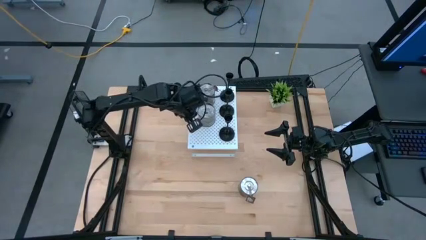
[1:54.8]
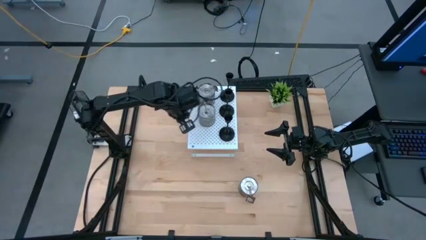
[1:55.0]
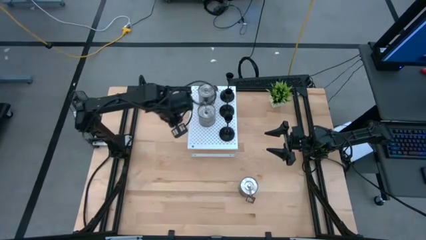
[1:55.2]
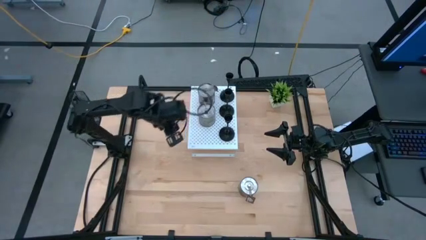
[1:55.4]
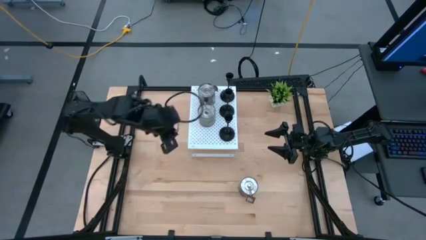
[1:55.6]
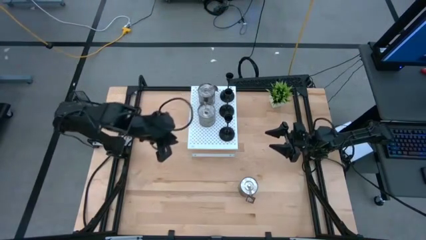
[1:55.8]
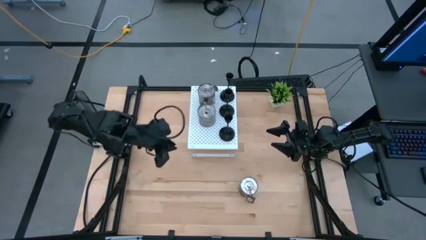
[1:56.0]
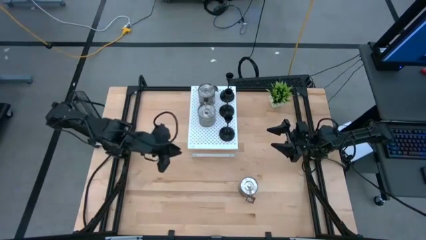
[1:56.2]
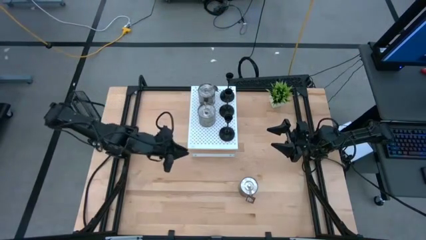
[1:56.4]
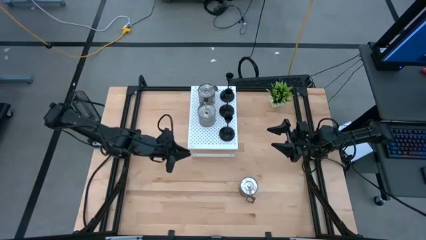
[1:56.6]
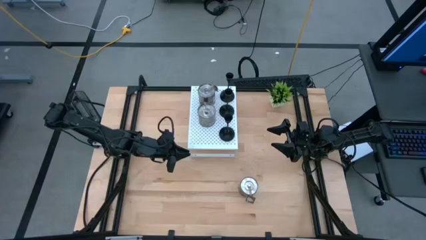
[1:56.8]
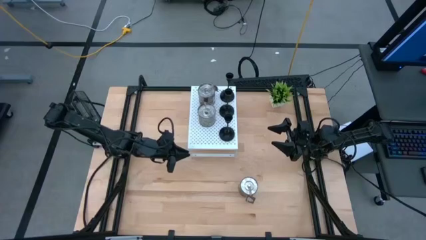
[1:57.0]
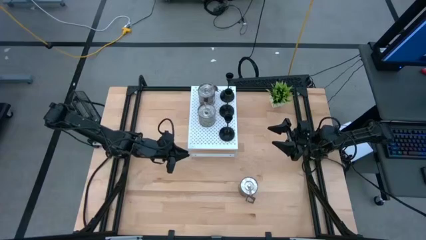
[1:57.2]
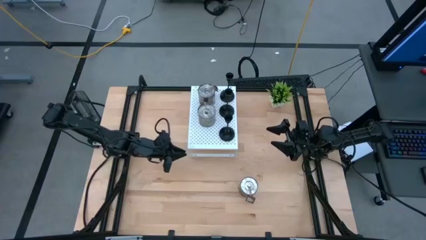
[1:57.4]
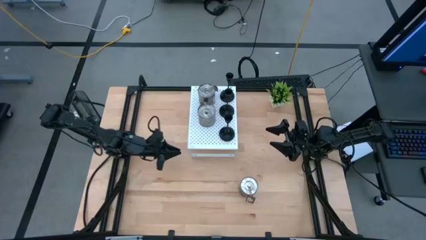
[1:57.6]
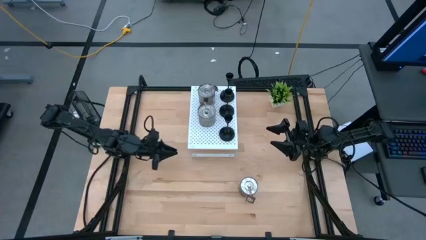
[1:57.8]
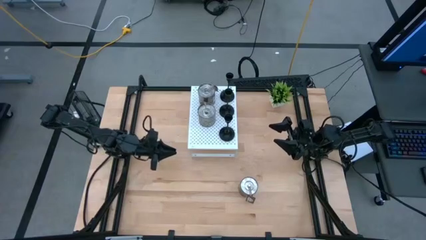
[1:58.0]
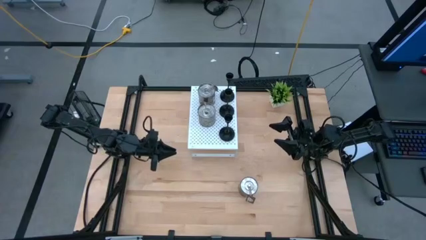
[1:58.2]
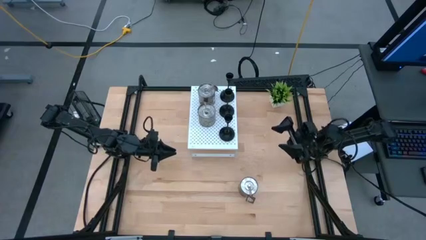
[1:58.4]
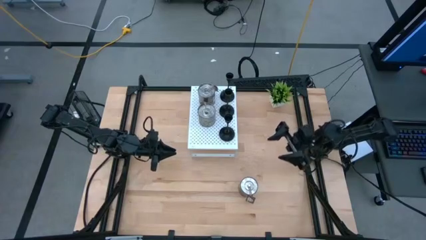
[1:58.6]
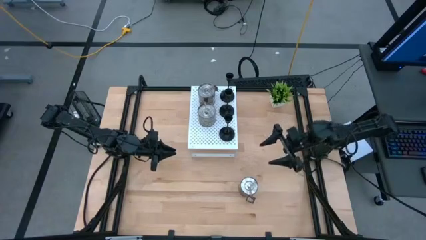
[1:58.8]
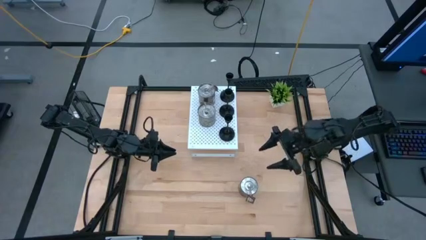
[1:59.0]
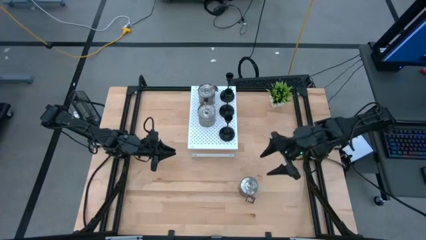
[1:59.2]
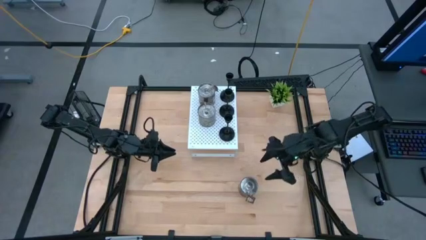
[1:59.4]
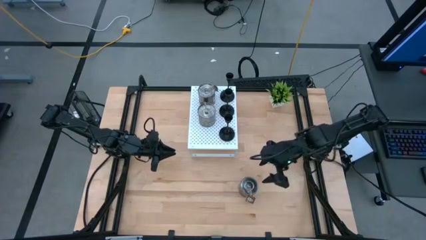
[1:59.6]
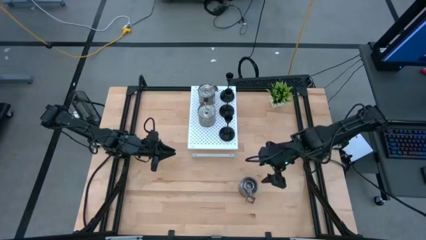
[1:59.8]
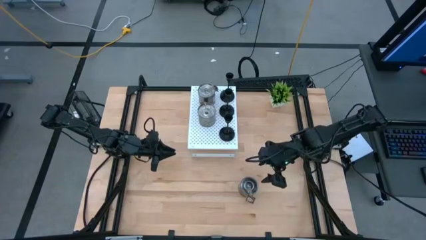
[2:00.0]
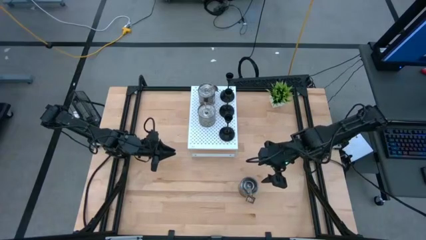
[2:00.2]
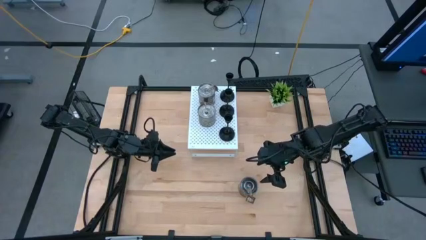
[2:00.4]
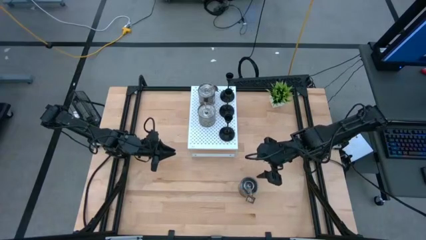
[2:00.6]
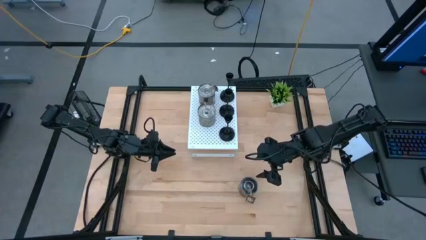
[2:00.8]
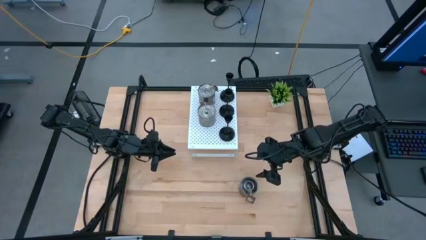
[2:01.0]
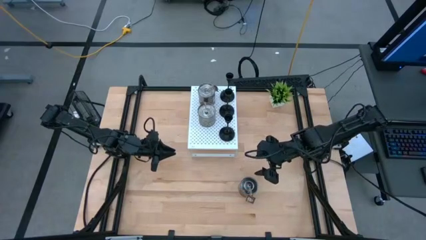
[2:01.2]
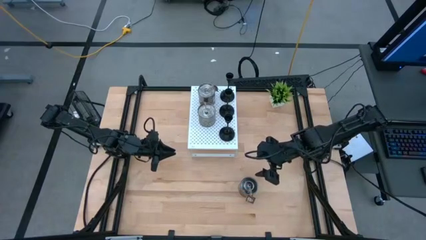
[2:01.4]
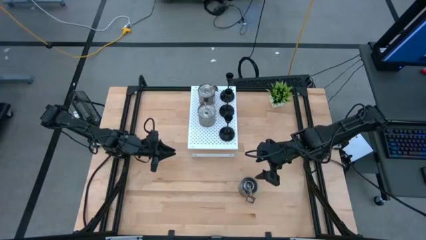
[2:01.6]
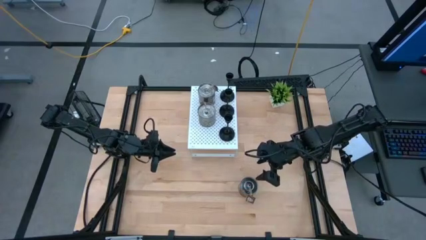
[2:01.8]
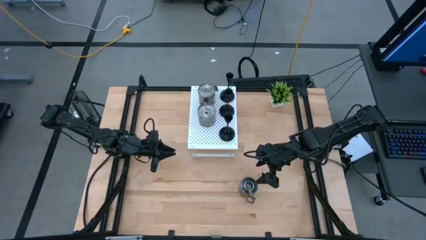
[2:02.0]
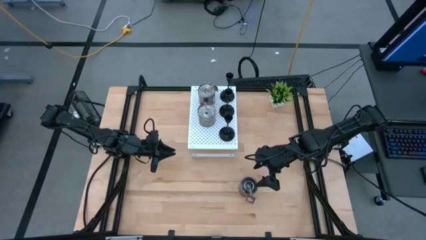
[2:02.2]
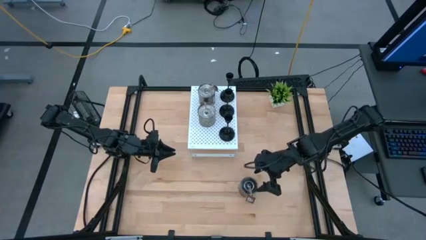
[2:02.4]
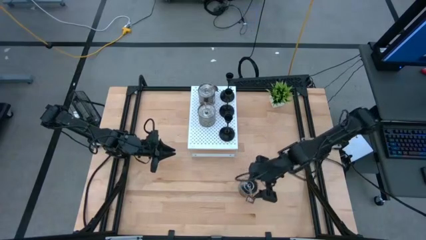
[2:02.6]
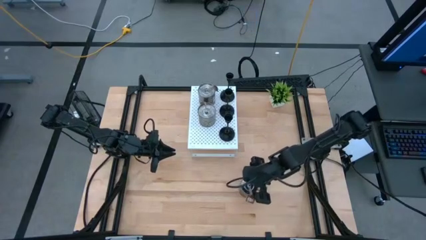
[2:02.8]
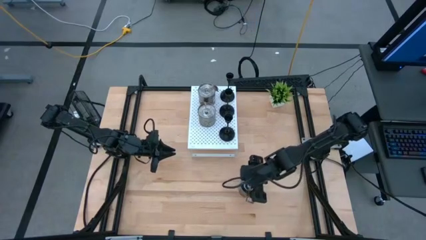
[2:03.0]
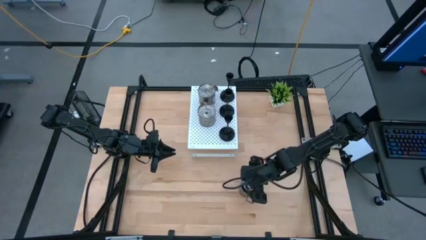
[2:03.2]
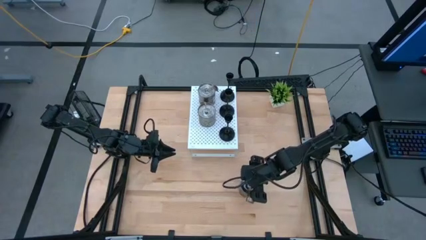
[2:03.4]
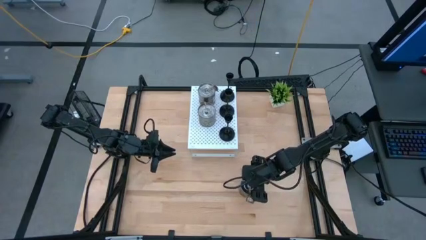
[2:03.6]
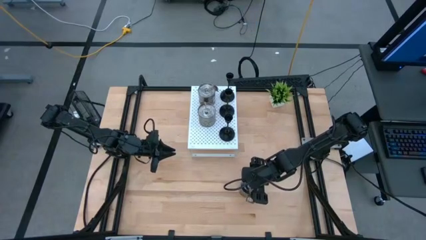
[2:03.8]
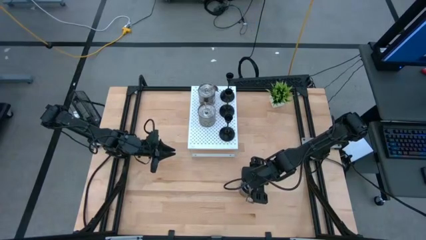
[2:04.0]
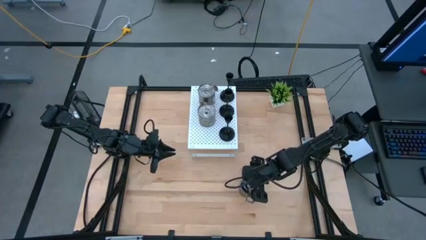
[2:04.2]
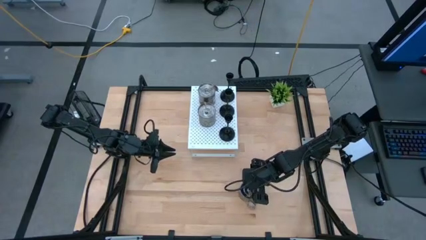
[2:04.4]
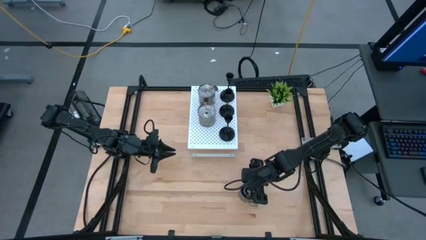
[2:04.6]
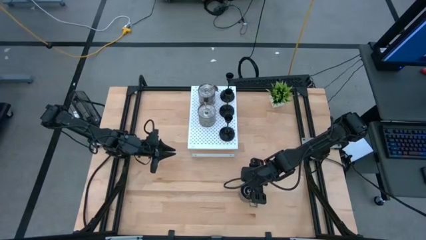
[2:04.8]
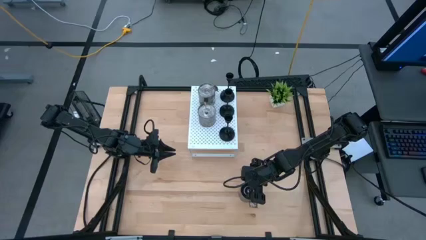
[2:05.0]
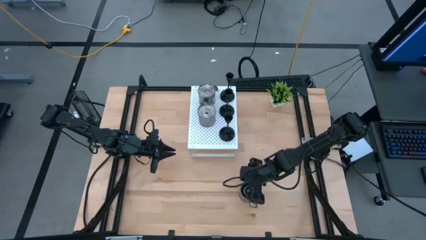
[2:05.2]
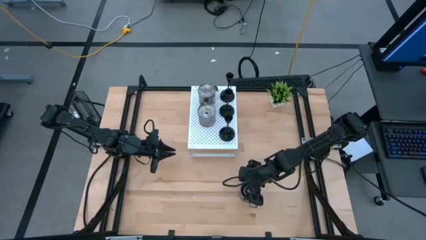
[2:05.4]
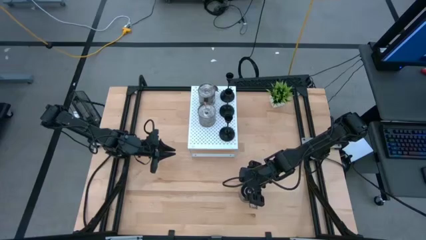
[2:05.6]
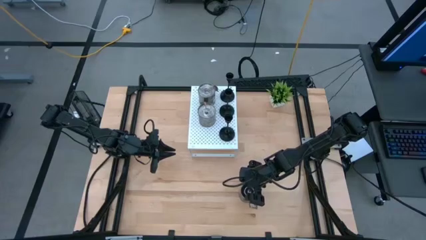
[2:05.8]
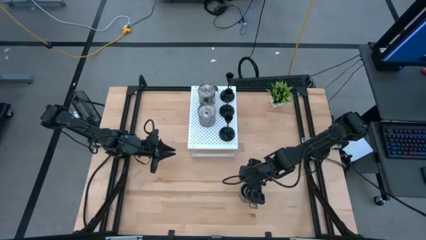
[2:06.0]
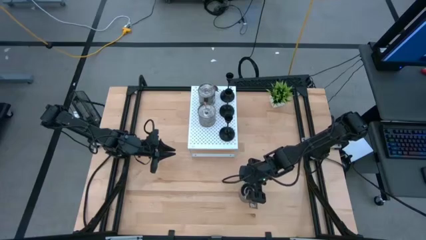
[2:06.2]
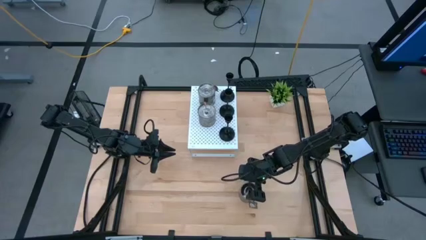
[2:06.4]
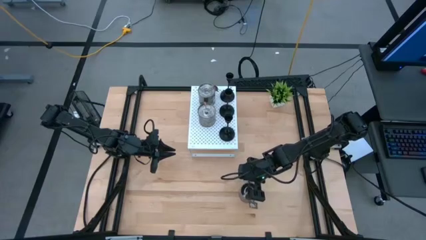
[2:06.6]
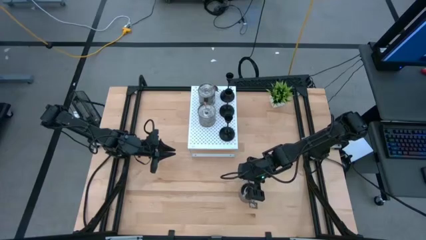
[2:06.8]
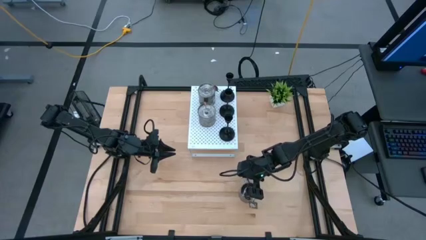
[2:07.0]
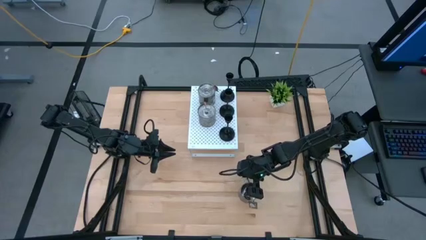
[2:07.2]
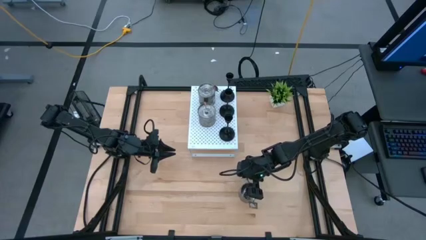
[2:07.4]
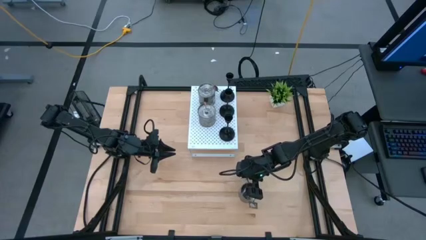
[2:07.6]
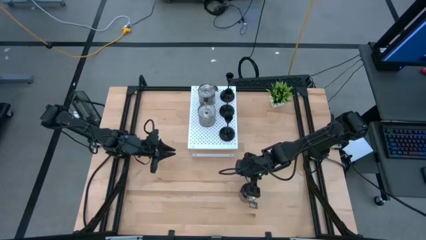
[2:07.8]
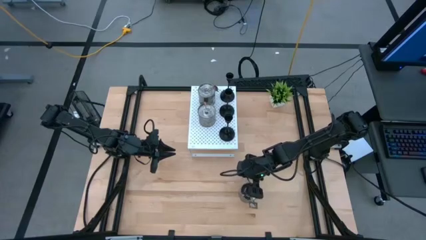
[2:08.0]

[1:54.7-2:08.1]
Task: Pick & Place candle stick holders
Put the silver scented candle on the shelf aligned with the other silver scented candle

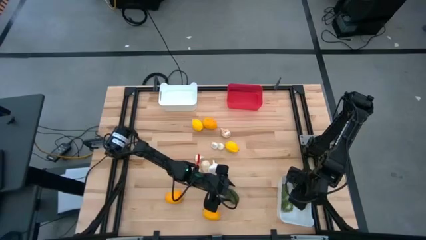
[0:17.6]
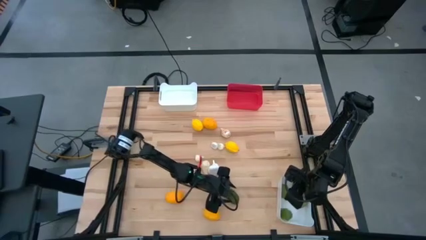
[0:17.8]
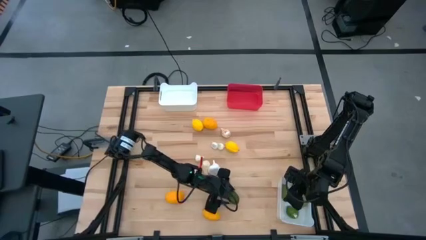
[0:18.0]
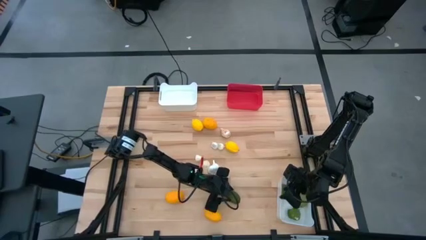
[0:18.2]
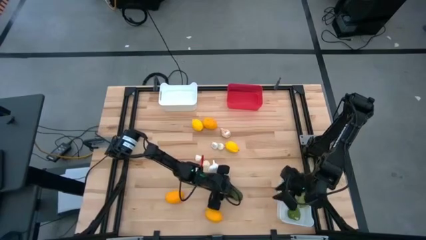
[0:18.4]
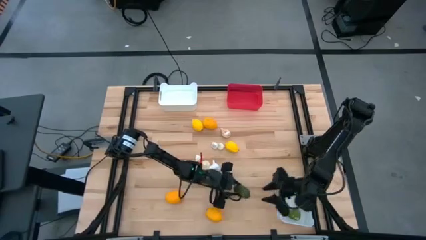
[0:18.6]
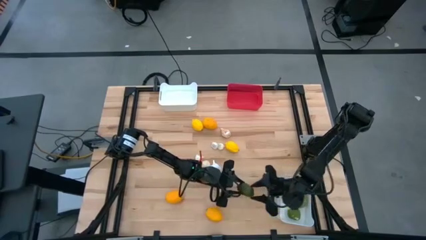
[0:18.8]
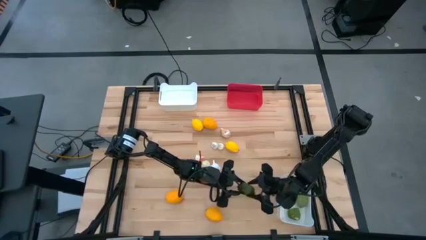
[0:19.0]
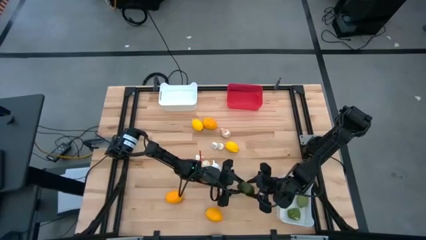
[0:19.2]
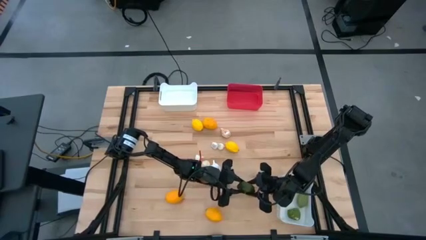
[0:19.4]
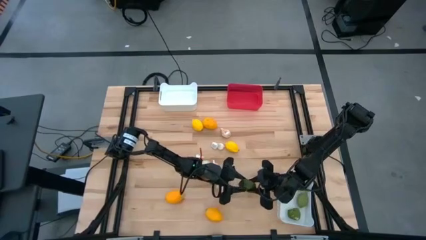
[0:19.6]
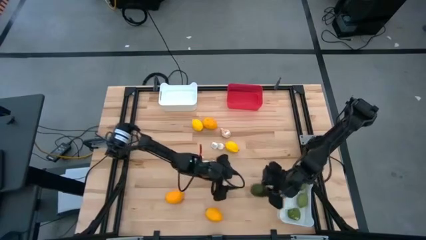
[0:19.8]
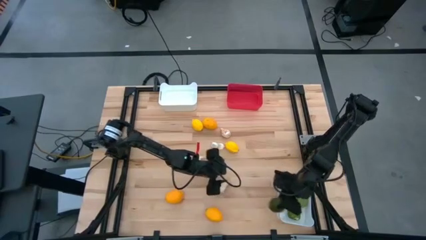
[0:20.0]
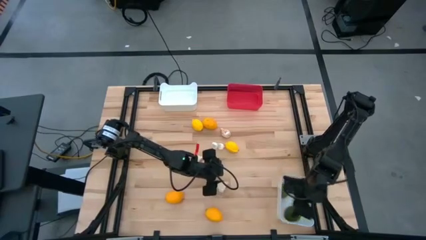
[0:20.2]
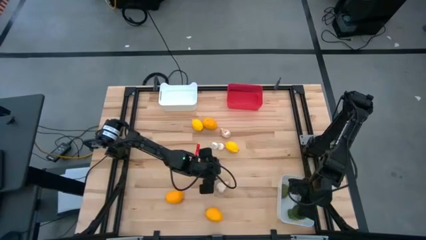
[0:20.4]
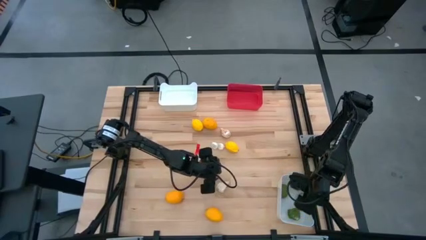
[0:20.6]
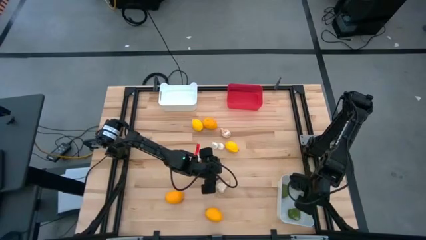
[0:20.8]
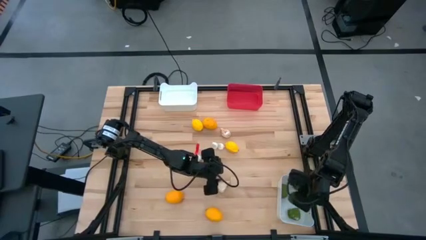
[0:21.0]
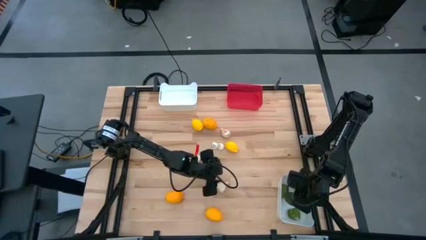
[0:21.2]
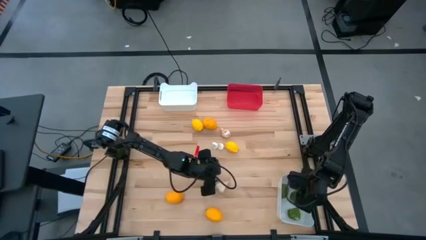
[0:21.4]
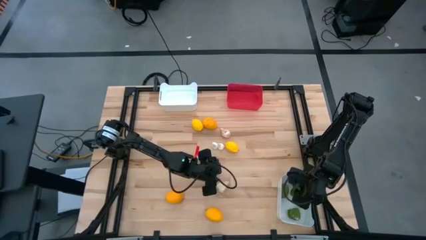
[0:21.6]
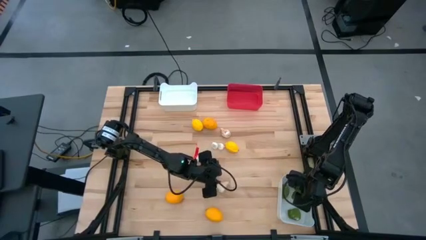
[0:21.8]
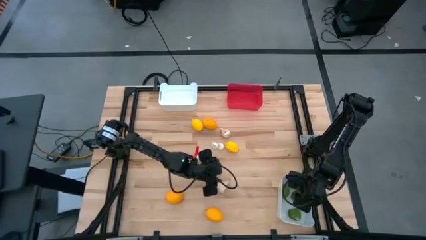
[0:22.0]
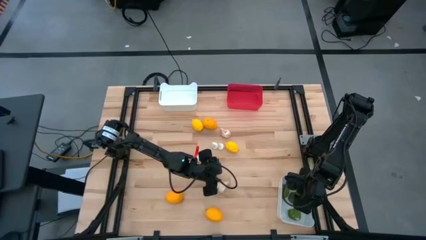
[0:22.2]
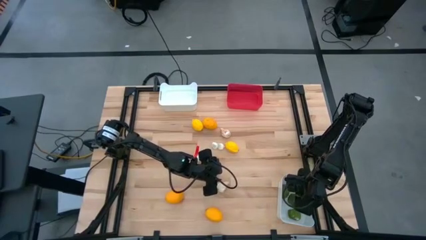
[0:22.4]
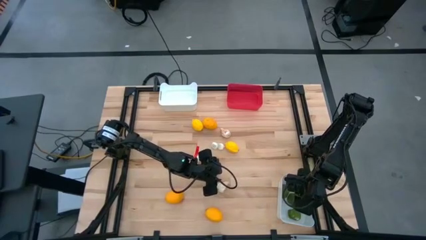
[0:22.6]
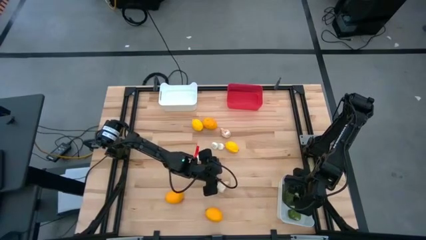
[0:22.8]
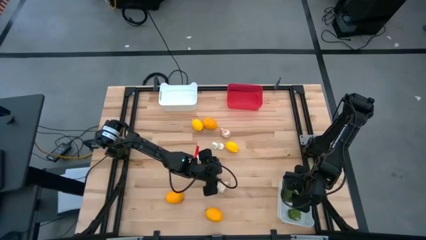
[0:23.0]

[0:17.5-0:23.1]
Task: Sort produce into baskets
Put the green lime into the bottom white bin
